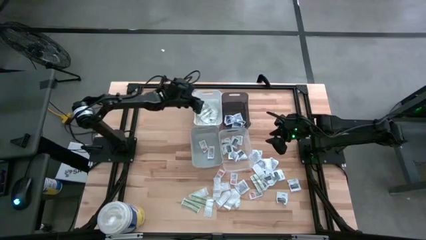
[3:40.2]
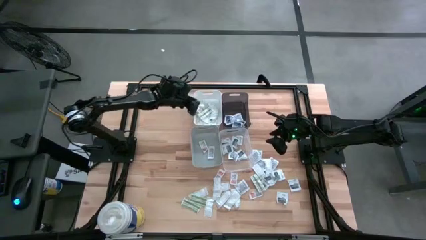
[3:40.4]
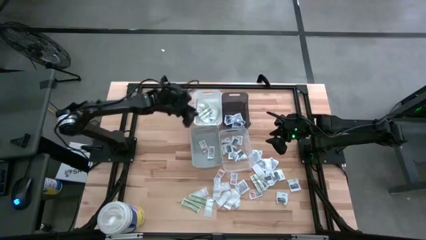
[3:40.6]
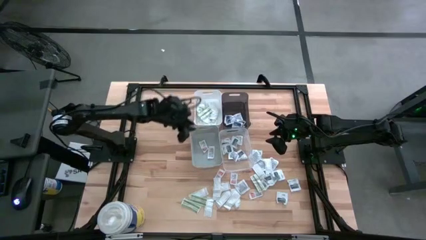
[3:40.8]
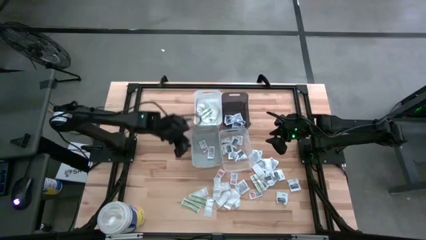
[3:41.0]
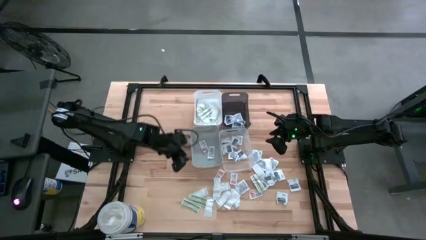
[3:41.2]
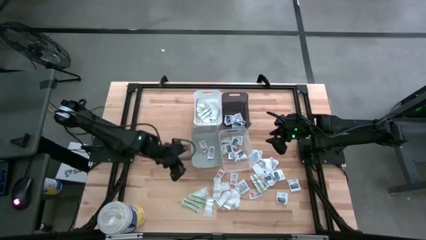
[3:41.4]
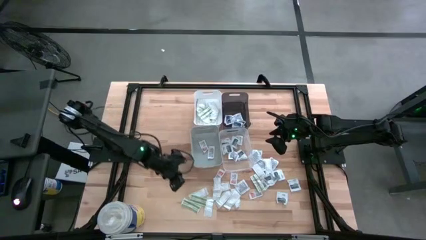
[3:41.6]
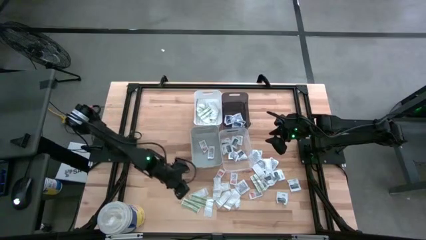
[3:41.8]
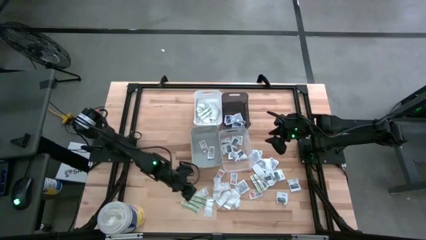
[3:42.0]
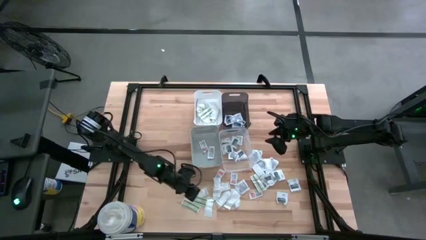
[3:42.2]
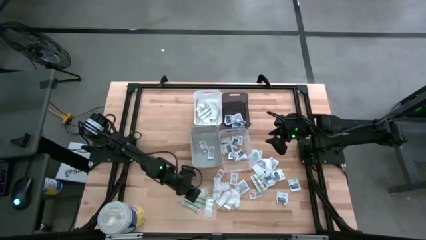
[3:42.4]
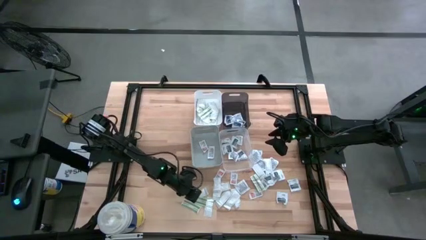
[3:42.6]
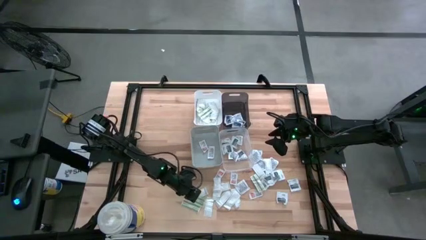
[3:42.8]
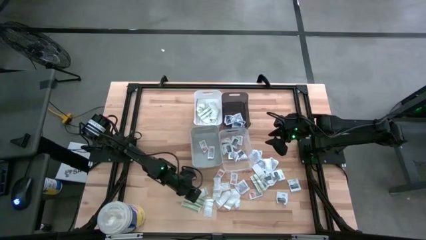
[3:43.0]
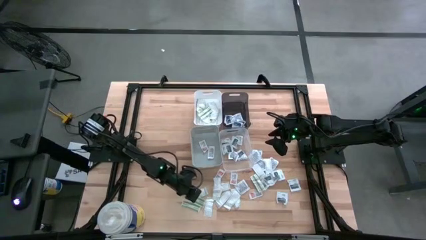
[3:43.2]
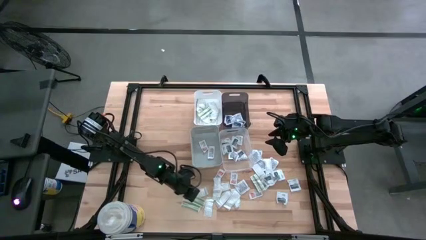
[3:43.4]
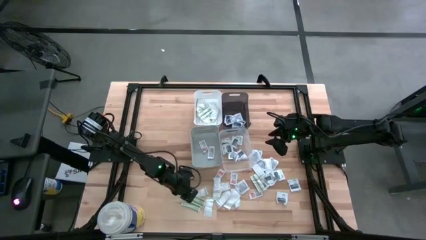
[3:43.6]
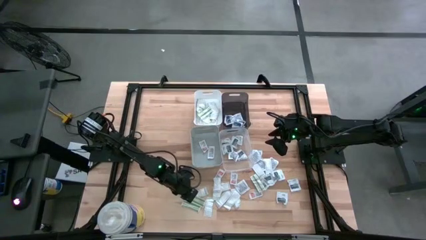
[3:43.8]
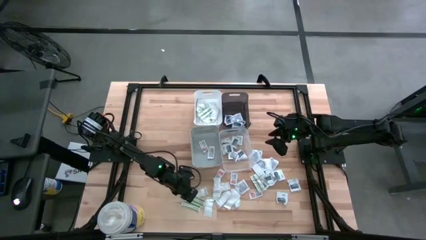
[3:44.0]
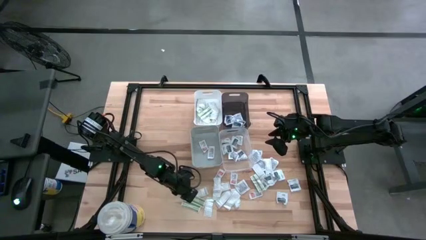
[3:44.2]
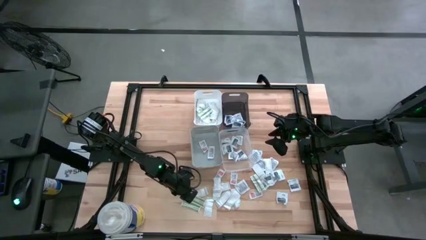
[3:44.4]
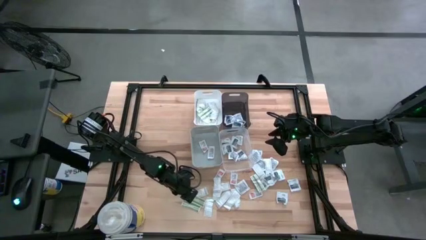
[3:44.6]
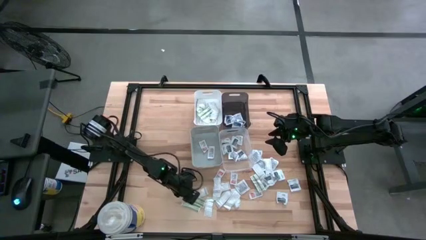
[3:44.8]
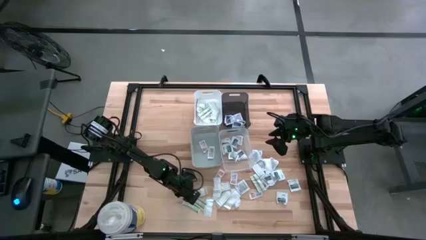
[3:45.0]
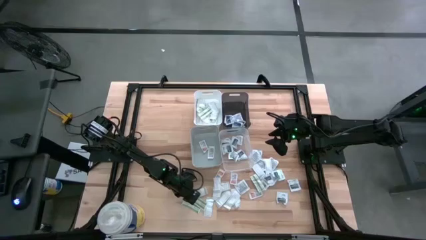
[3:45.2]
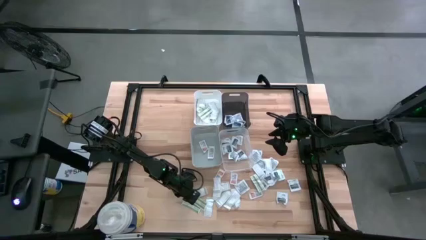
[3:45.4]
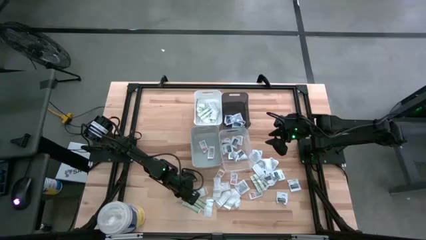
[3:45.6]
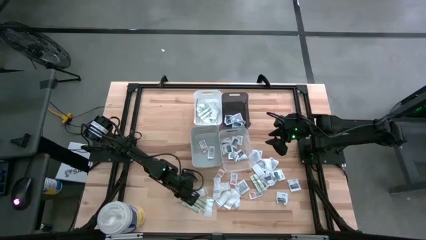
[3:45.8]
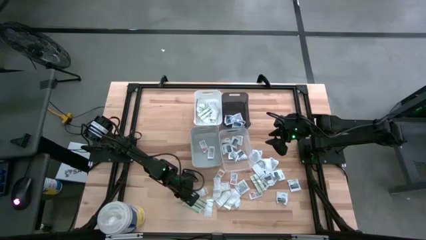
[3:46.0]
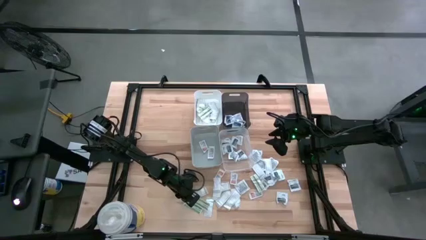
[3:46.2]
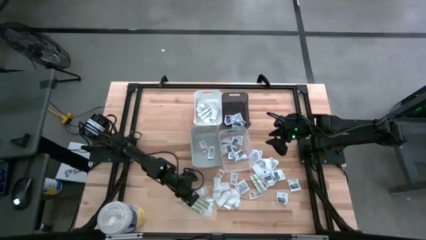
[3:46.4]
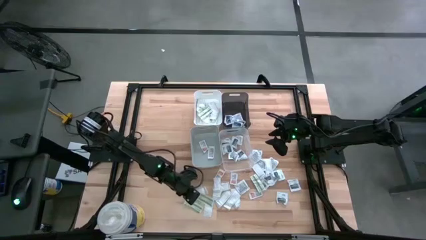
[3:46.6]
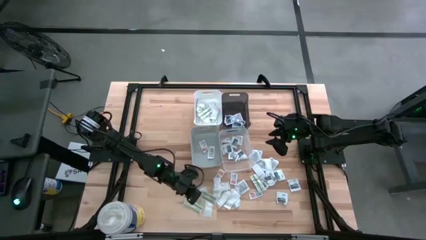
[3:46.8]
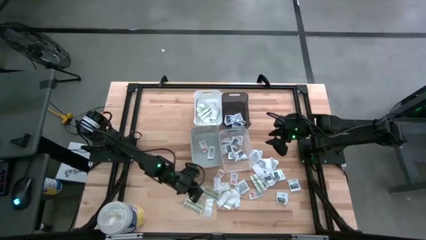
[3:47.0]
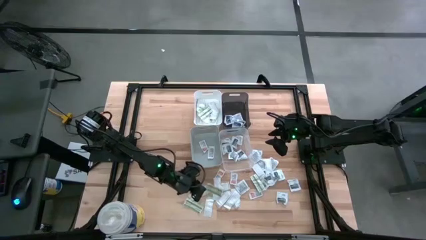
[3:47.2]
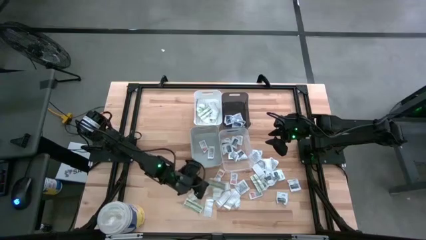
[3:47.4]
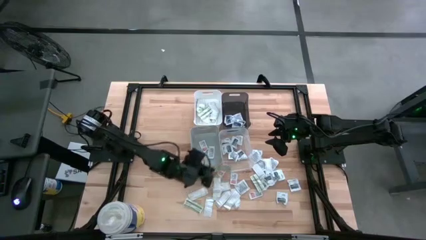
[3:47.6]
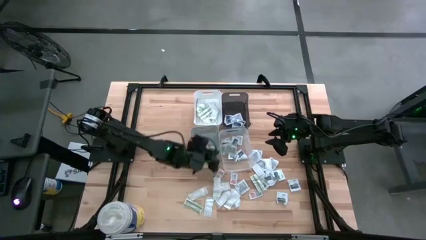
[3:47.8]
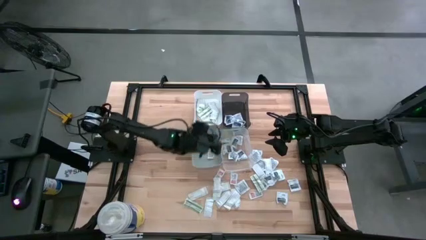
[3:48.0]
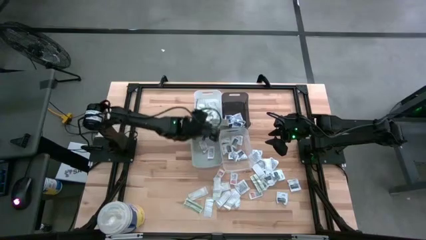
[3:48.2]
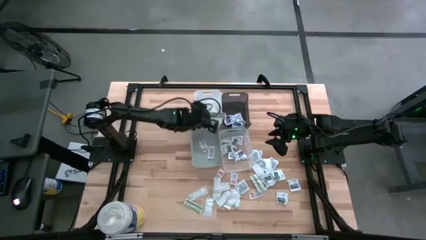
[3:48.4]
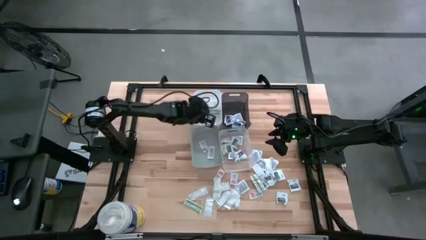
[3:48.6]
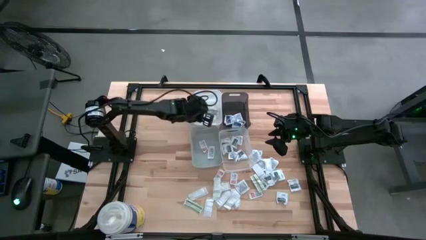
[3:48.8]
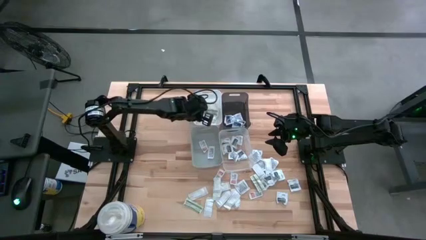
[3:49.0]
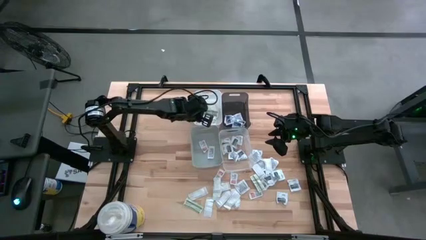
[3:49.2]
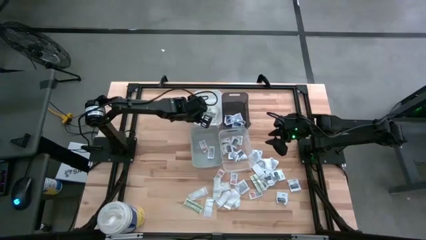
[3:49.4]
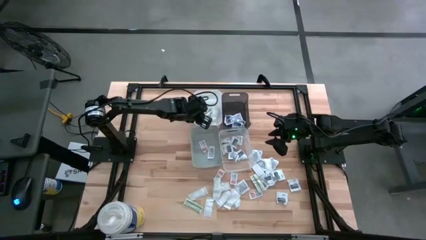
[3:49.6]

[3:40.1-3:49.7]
Task: Pick & Place First Aid Supplies
Put the green bandage pack into the white bin

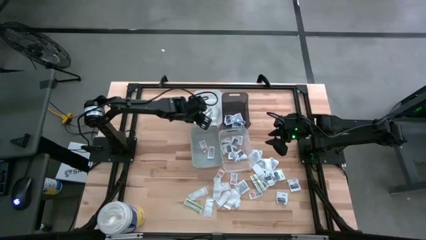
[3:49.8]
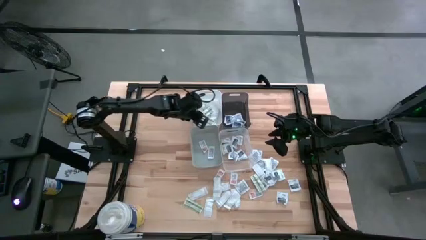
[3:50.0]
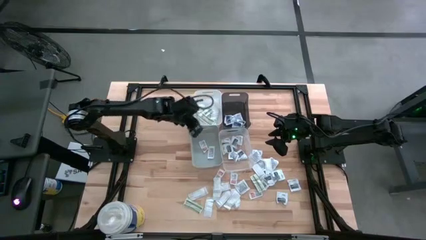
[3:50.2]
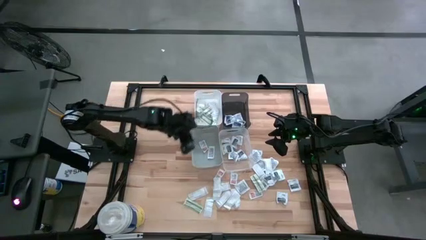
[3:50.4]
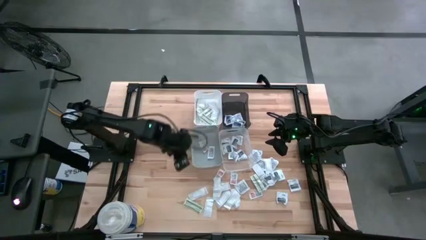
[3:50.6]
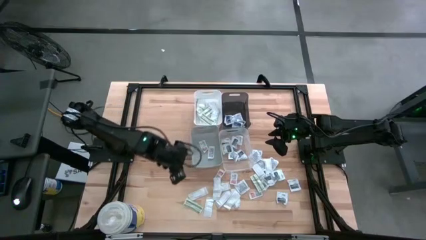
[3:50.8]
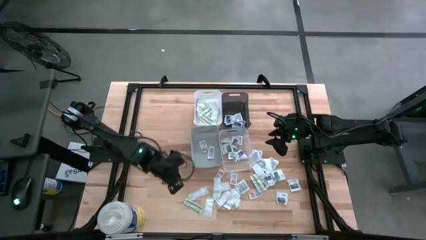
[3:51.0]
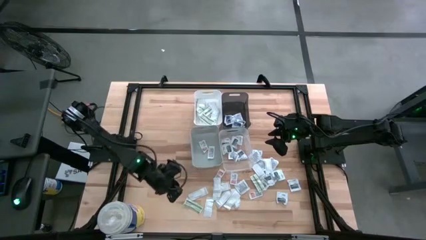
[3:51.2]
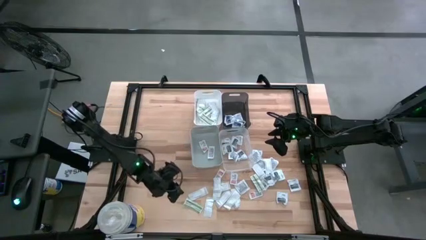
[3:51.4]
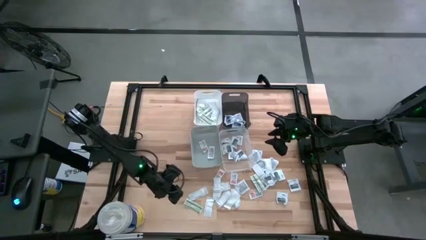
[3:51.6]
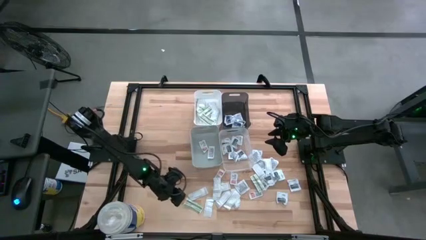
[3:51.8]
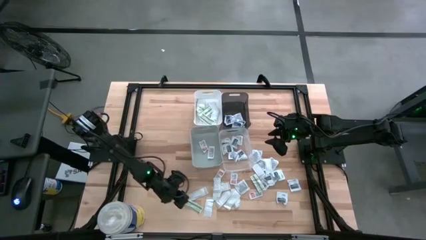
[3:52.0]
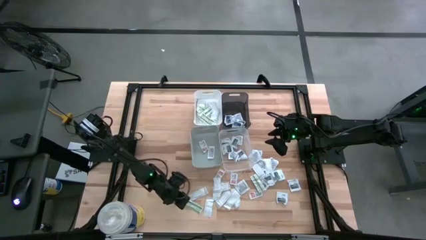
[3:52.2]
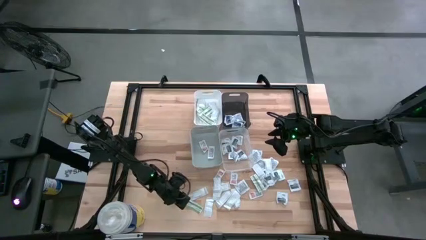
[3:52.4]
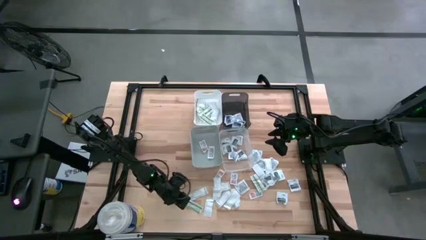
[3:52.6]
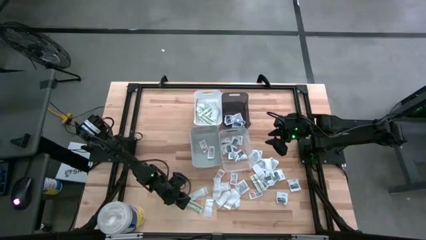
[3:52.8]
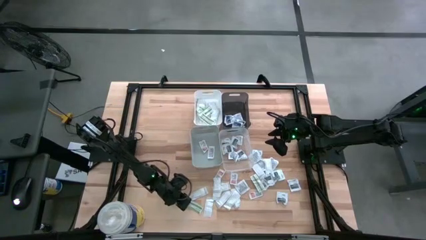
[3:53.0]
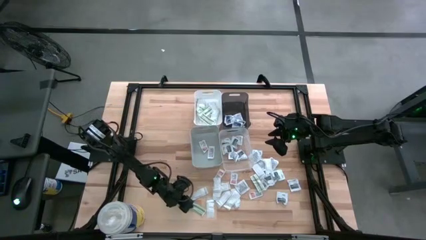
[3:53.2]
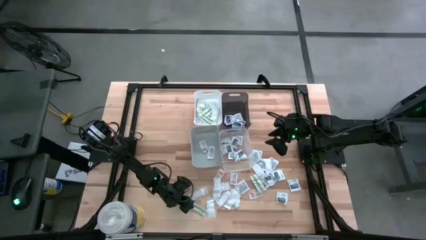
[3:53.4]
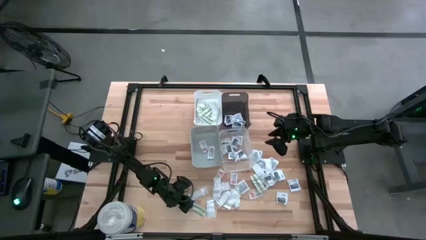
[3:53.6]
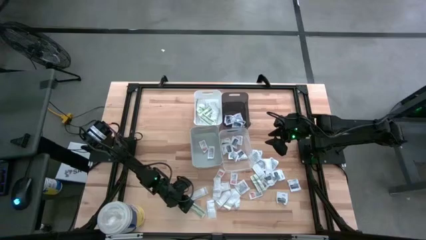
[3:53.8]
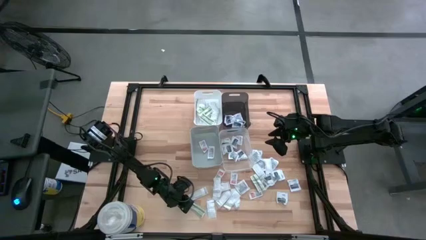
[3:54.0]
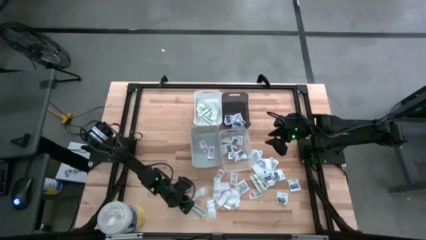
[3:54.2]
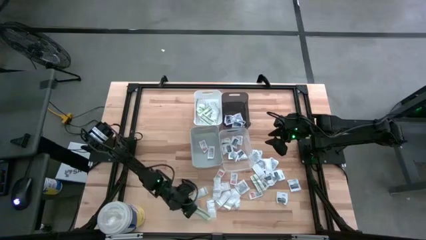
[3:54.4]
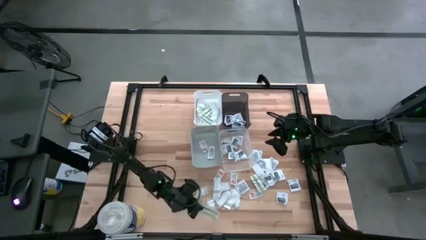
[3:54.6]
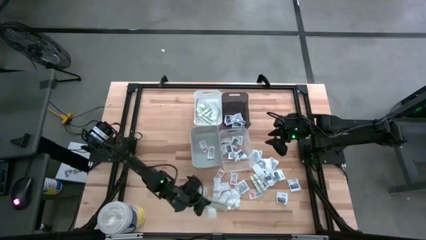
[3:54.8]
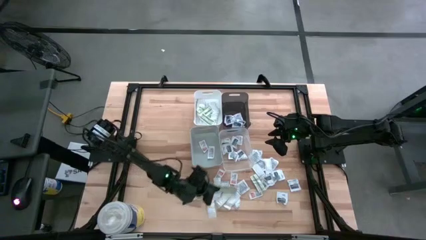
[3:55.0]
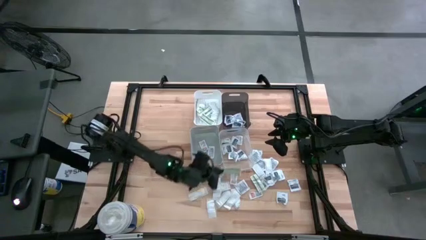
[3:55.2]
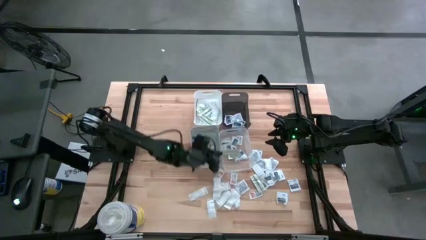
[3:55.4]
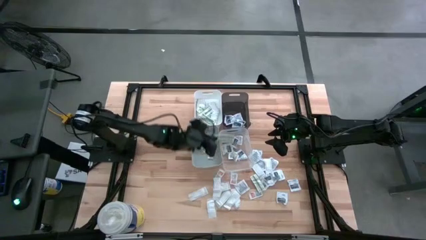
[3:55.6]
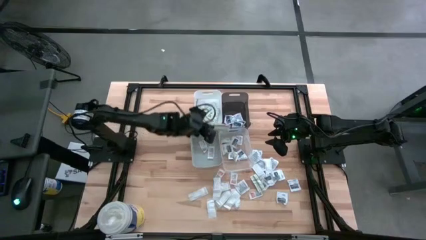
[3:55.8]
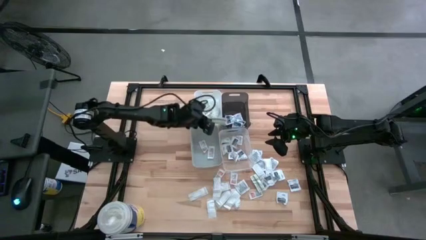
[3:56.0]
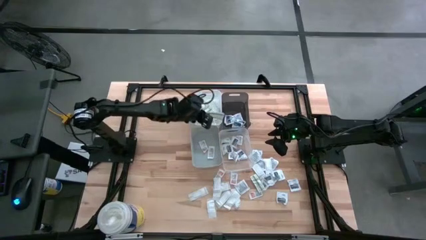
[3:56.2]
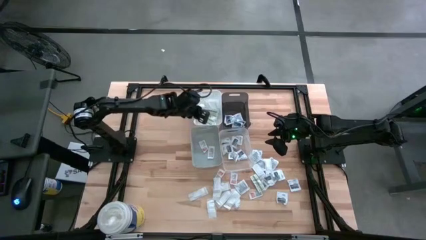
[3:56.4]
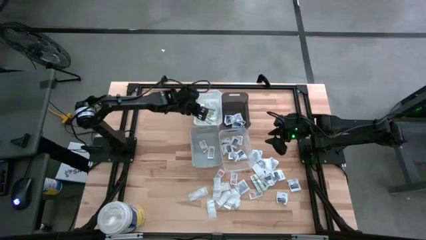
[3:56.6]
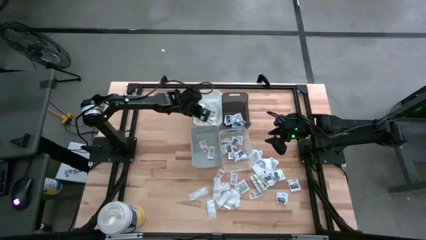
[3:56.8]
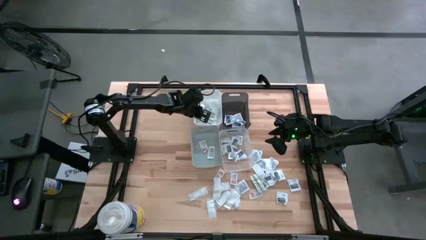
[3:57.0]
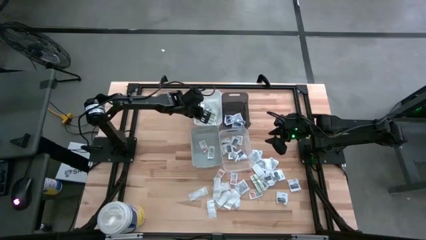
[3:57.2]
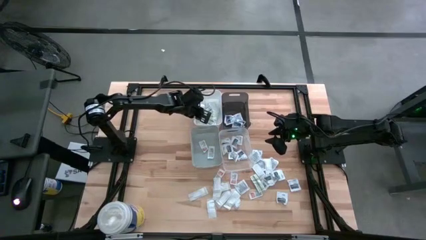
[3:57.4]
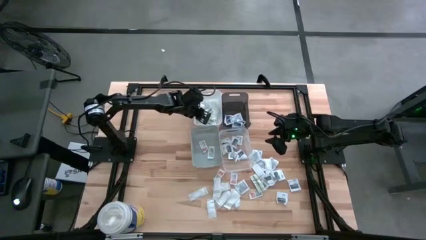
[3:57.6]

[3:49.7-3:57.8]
Put the green bandage pack into the white bin
